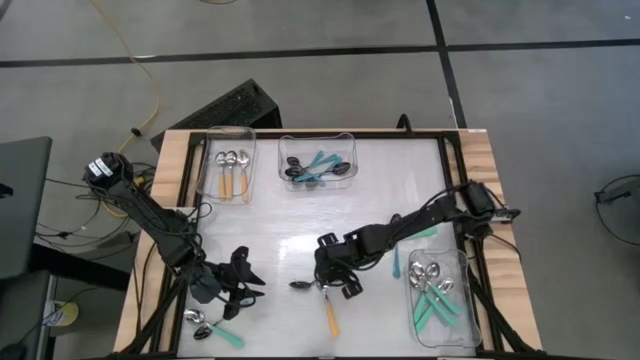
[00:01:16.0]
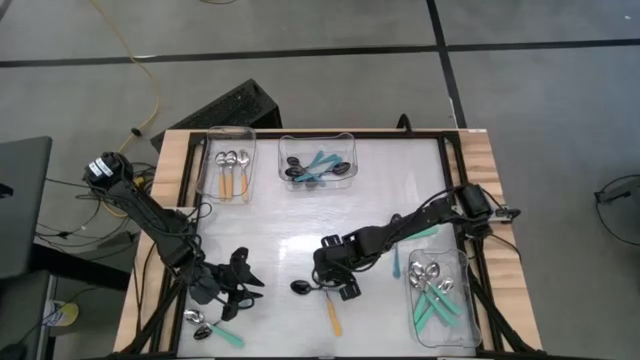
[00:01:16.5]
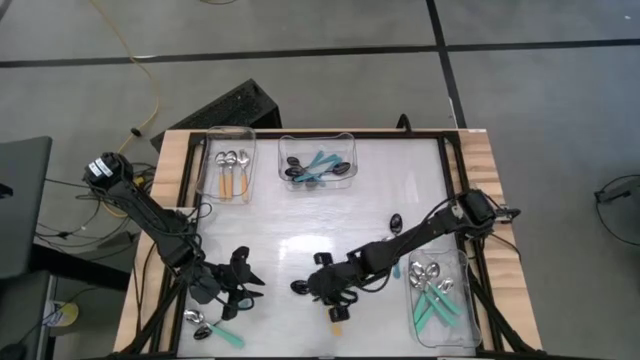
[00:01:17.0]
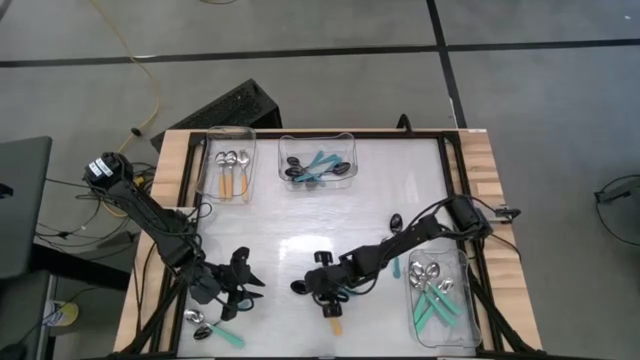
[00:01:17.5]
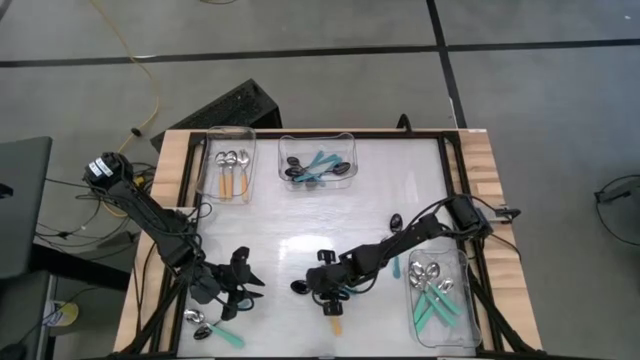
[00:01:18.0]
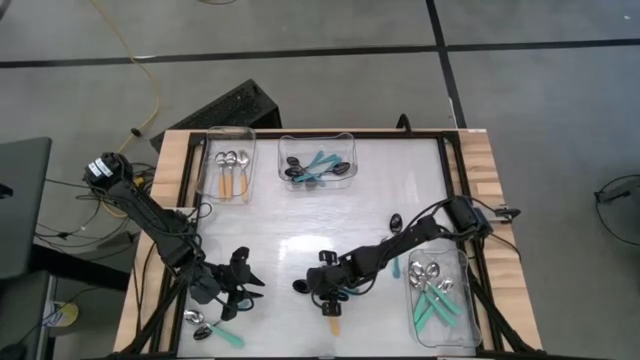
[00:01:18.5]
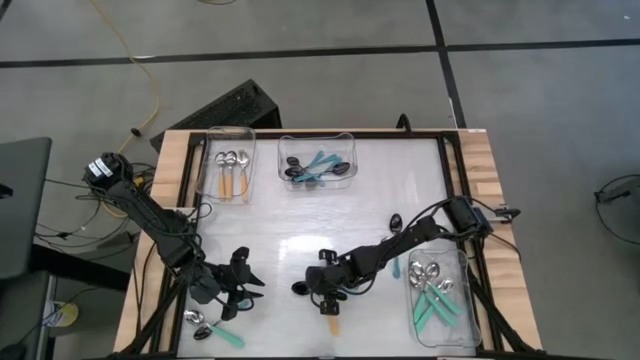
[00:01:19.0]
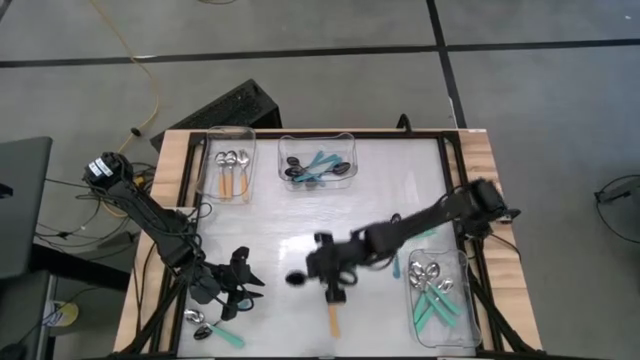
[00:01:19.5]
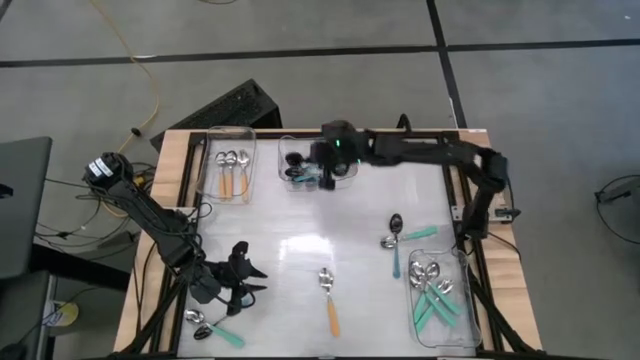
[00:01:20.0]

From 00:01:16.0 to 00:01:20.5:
Task: Sort silverware by color (type)
Put the blue spoon into the top middle transparent bin

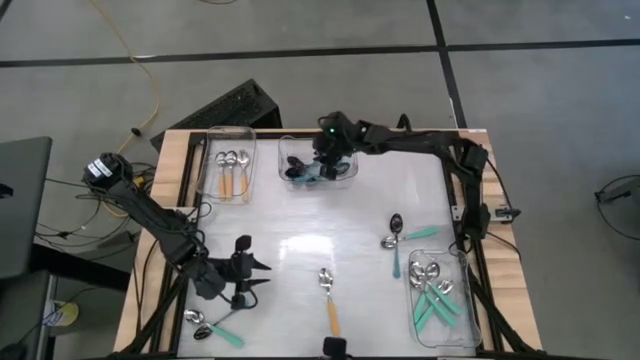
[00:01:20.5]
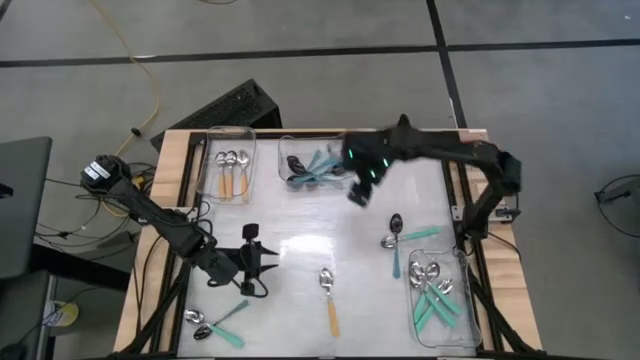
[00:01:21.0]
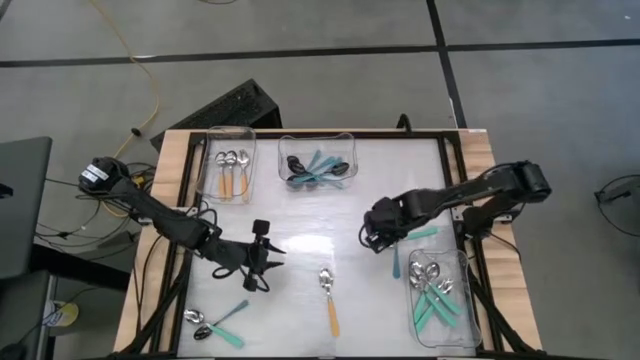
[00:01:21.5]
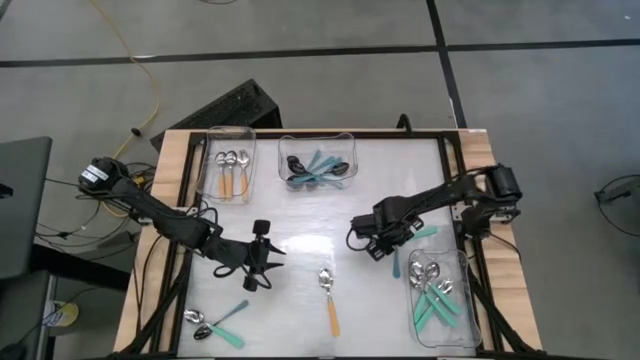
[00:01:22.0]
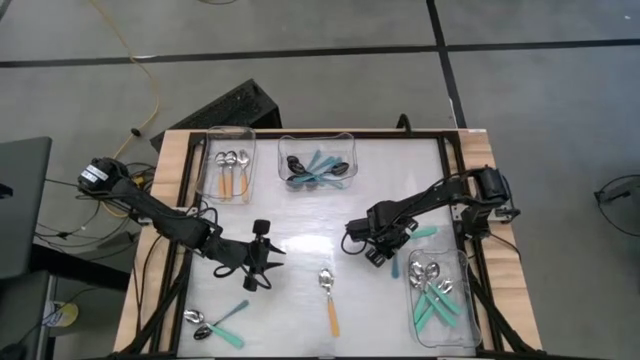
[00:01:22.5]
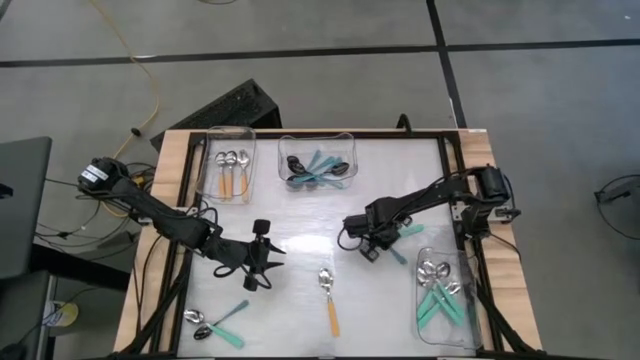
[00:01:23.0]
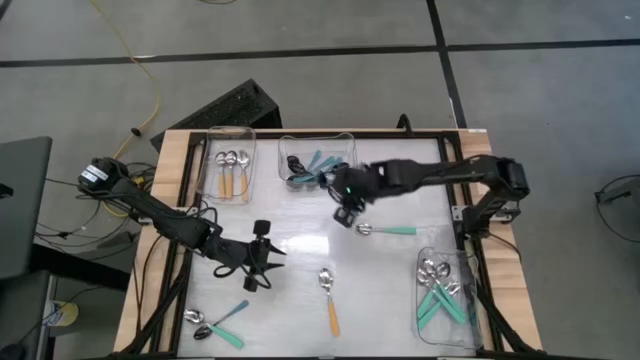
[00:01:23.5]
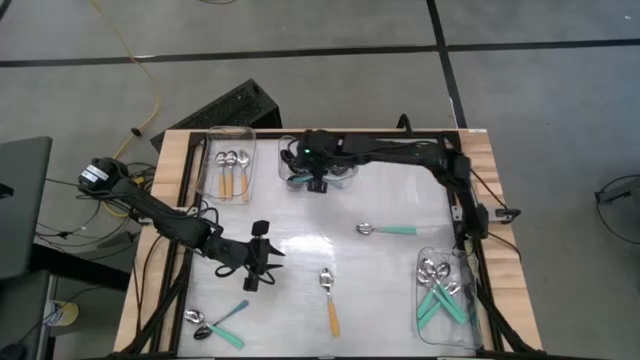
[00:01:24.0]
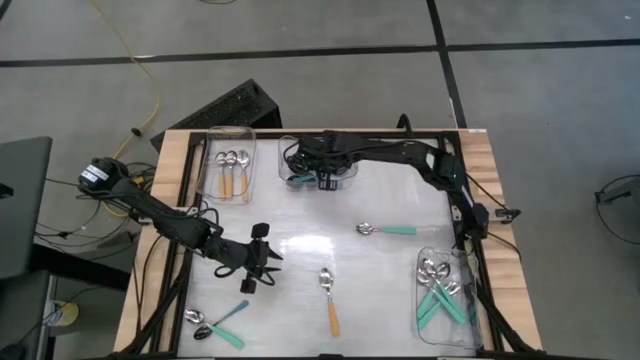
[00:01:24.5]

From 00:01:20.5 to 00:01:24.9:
Put the blue spoon into the top middle transparent bin

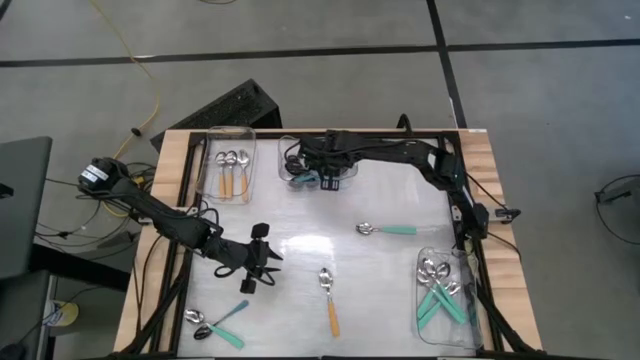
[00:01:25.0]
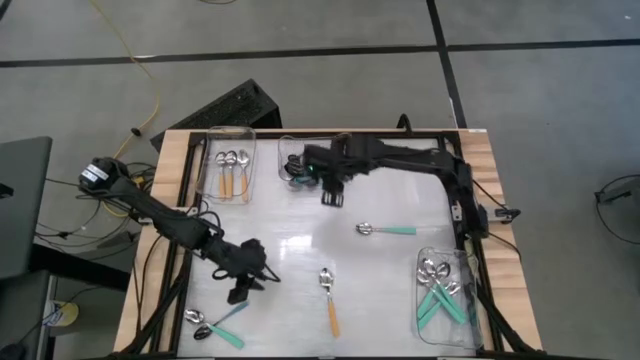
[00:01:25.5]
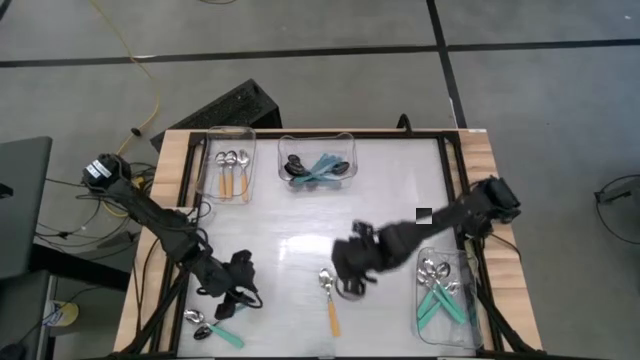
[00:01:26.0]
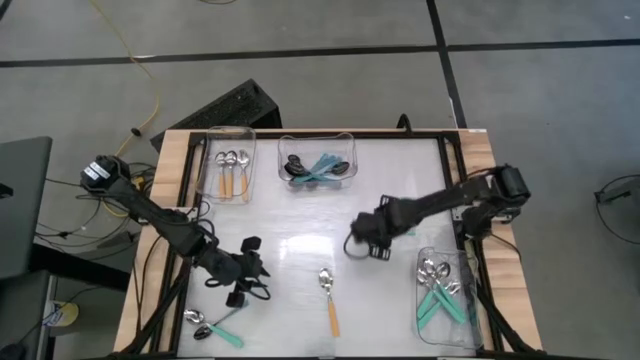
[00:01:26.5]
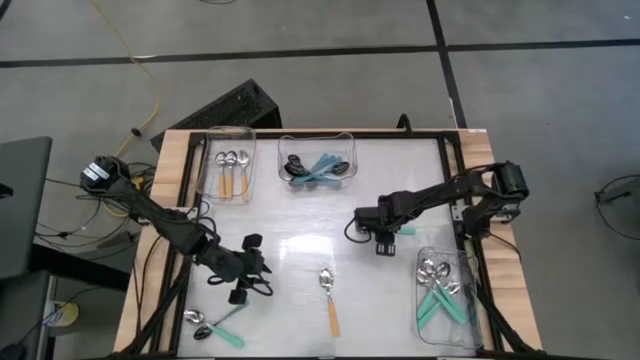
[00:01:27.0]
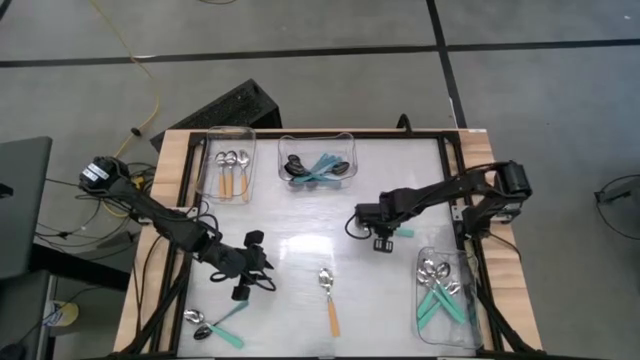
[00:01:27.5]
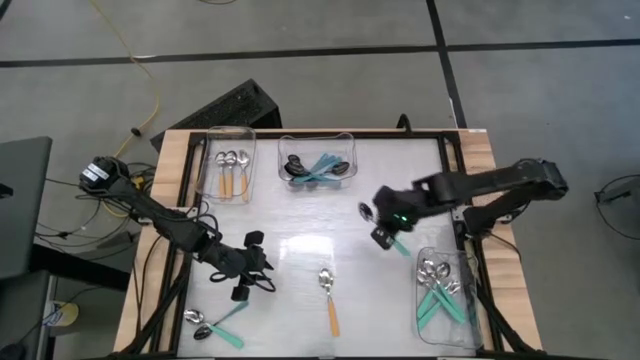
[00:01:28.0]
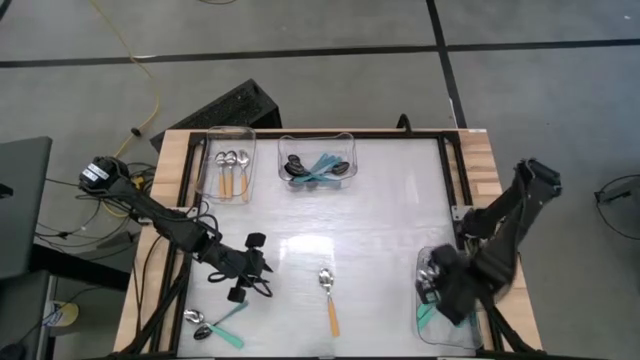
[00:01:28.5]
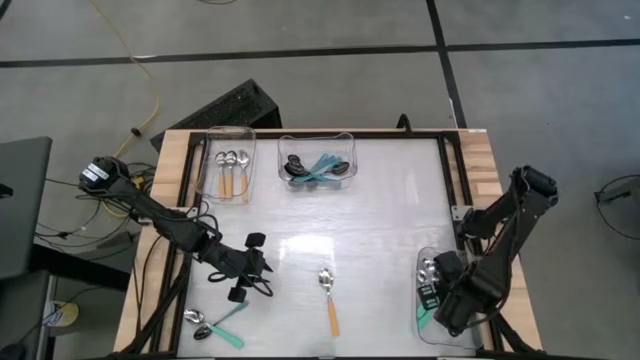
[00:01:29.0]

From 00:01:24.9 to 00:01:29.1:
Put the green spoon into the bottom transparent bin

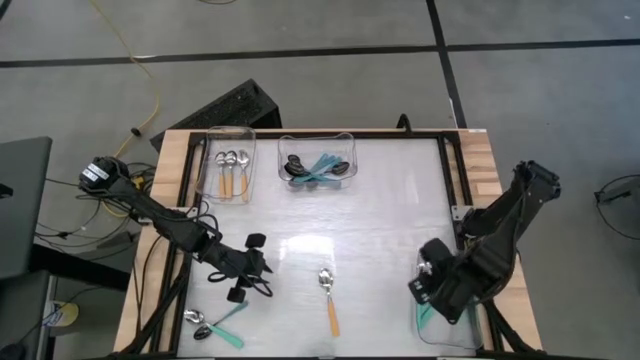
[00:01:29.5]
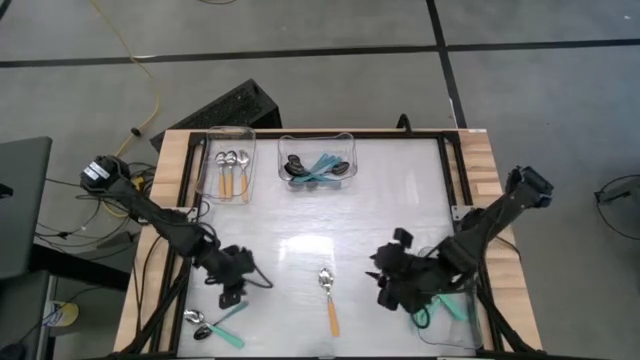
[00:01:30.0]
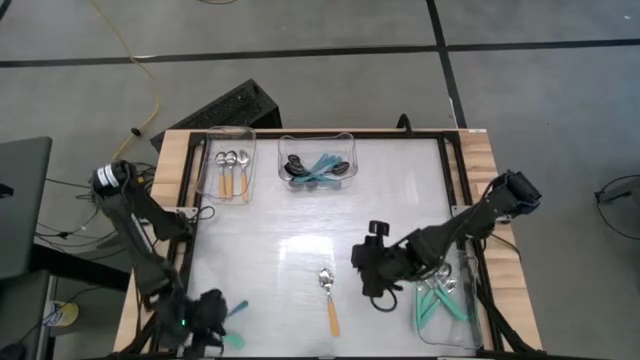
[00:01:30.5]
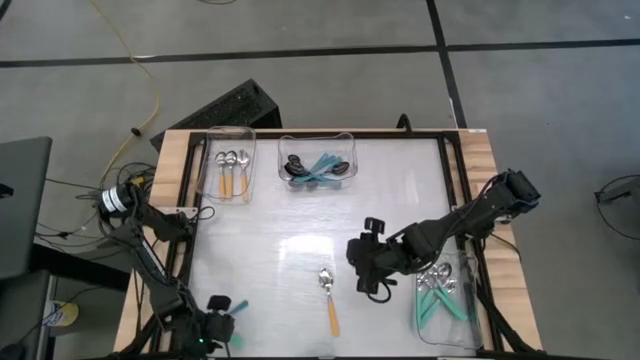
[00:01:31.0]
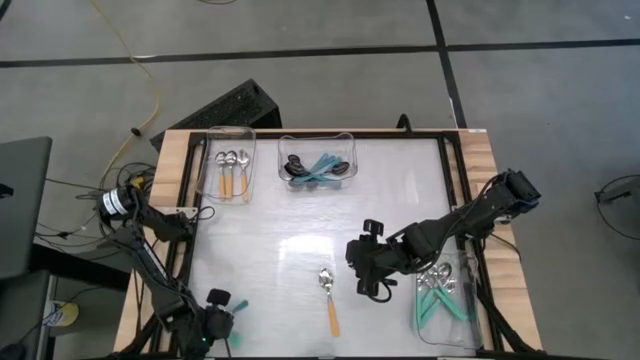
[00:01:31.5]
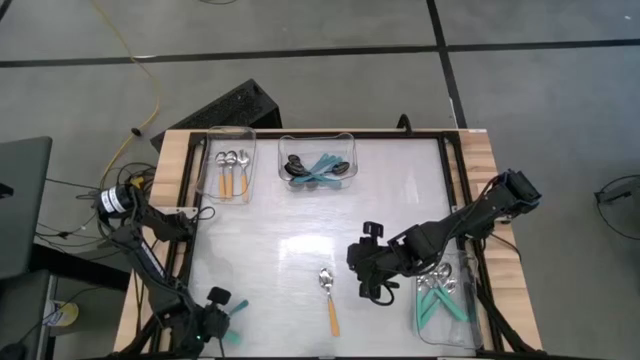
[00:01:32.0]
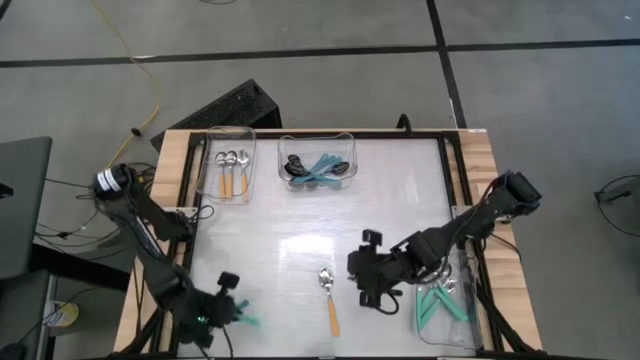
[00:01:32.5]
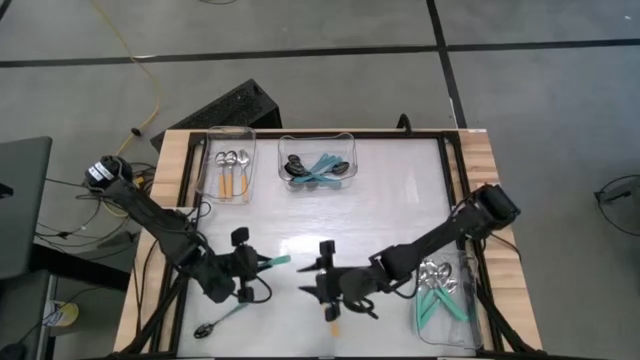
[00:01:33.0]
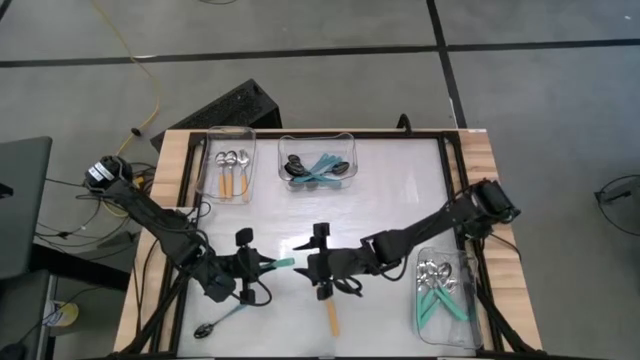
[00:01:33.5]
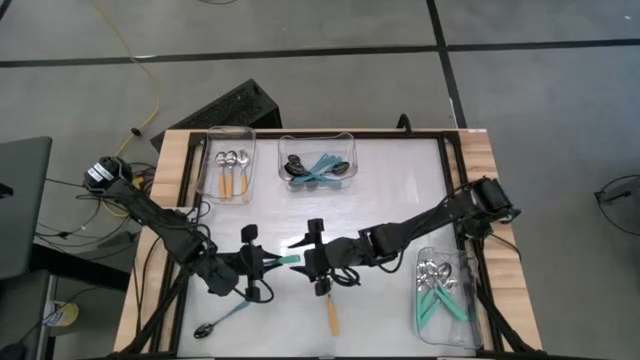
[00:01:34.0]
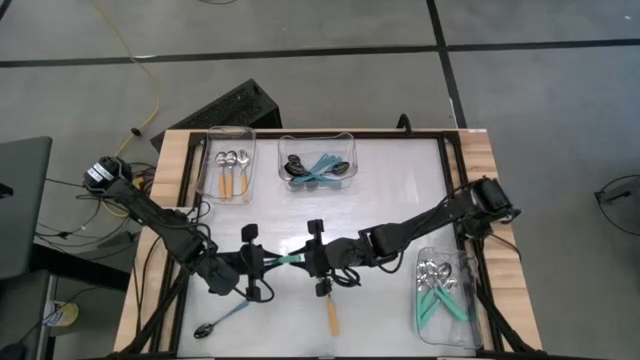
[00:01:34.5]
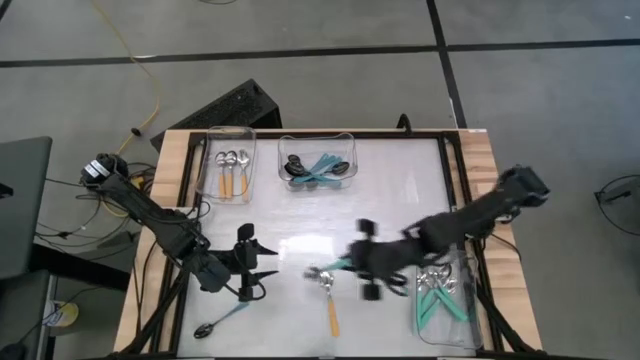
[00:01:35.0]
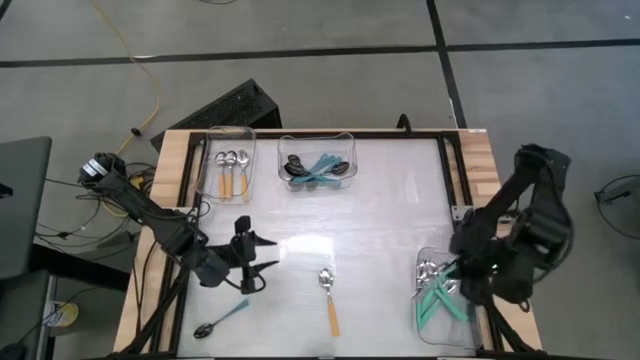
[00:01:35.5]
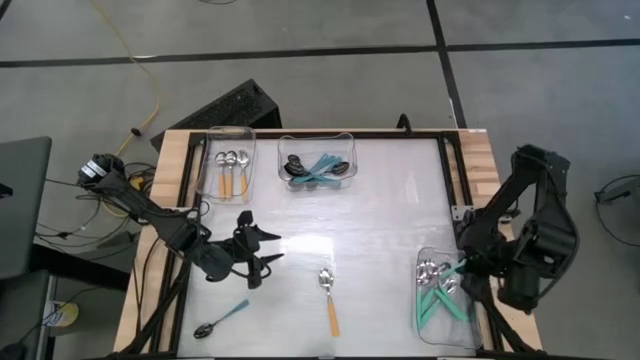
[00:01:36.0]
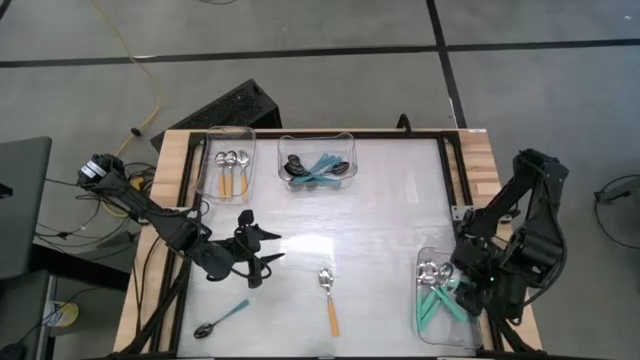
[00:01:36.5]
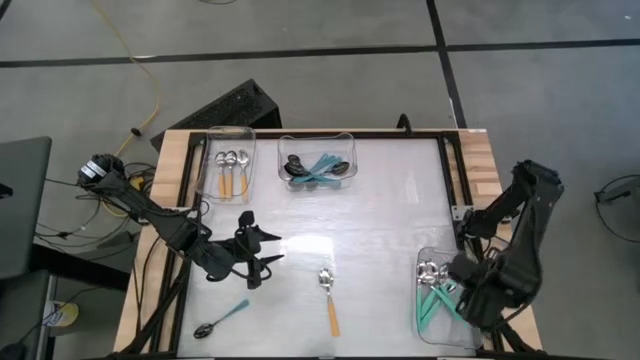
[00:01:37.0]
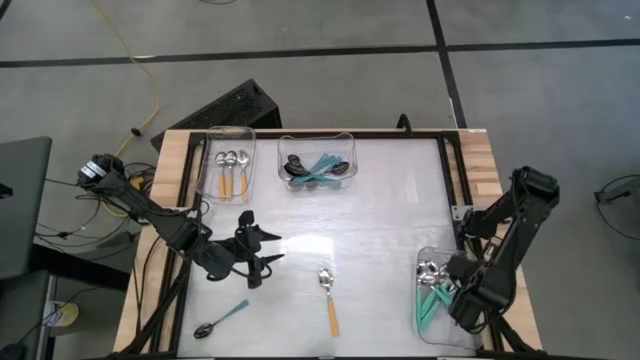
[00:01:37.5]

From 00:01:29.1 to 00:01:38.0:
Put the green spoon into the bottom transparent bin
